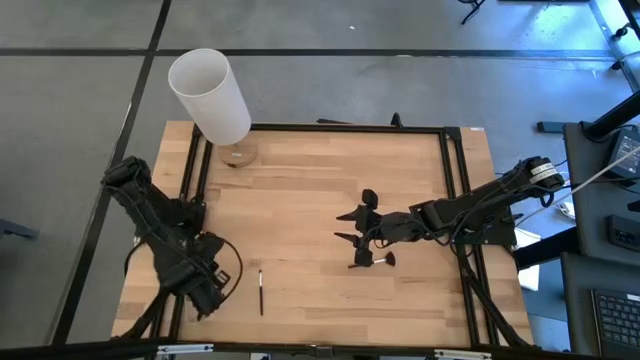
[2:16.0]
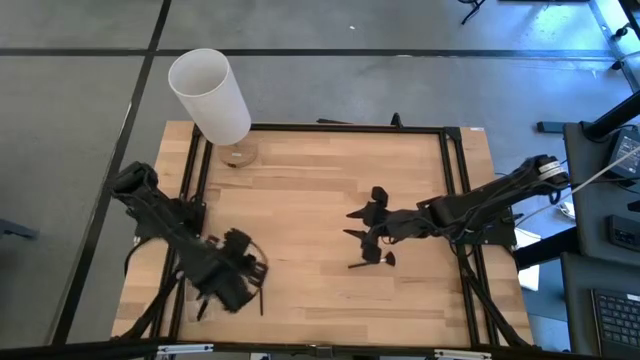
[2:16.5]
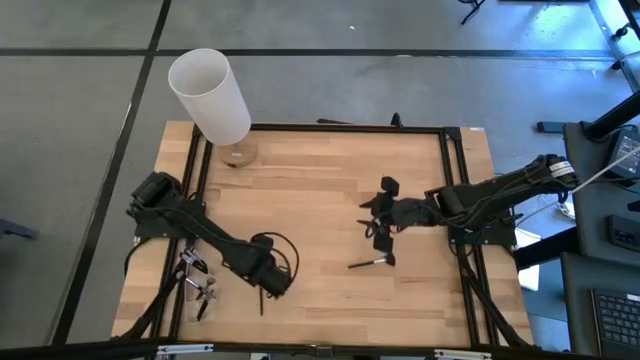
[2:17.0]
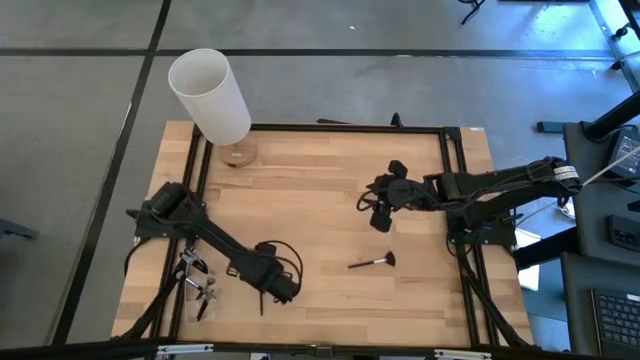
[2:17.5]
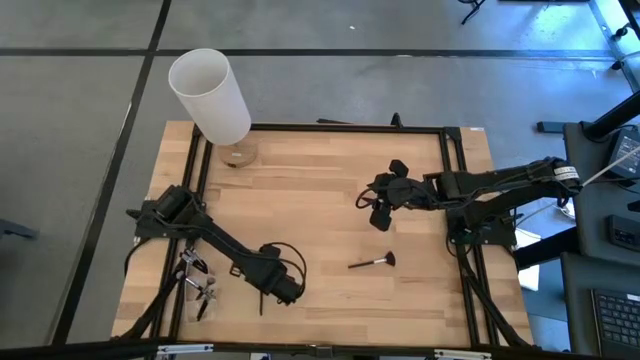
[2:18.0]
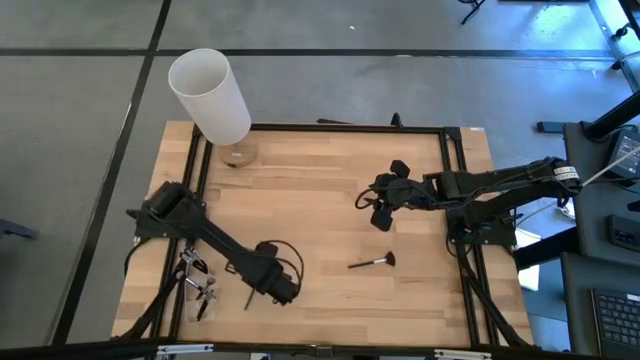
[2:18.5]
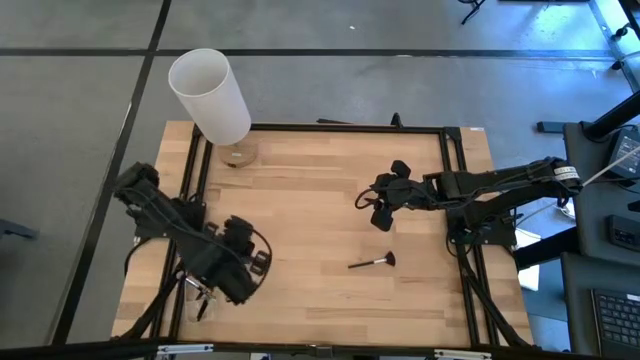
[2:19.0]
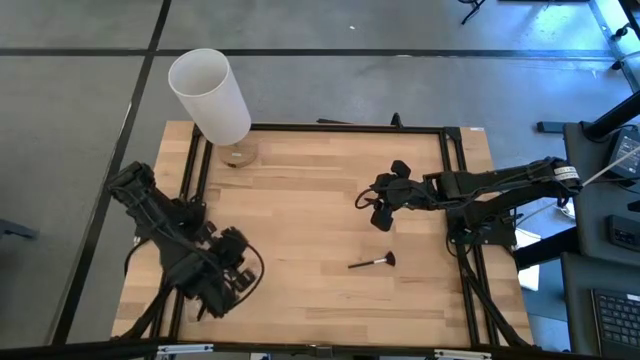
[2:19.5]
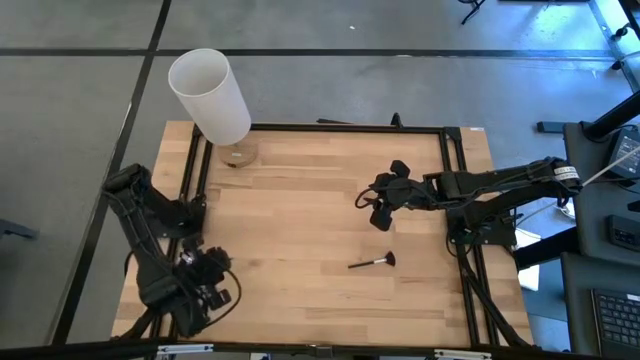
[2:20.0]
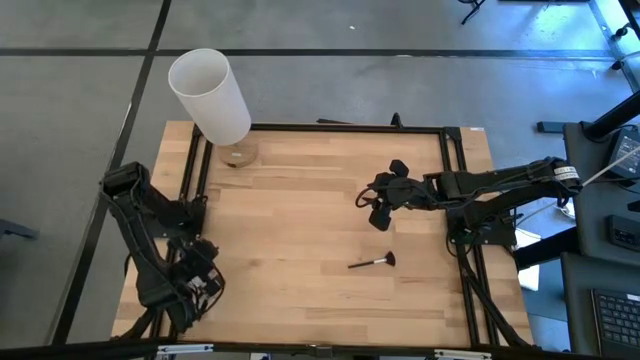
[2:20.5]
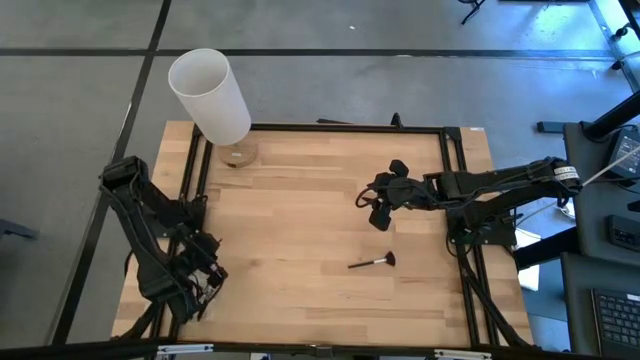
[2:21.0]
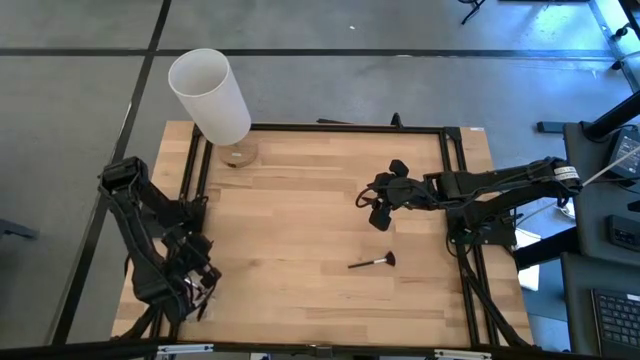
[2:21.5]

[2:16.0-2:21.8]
Task: Put items in baskets/containers
Put the eyeshadow brush into the transparent organizer

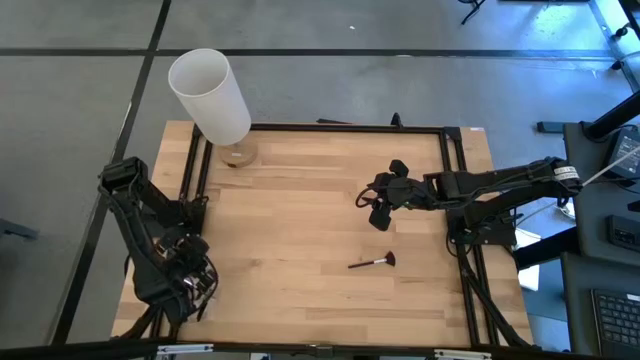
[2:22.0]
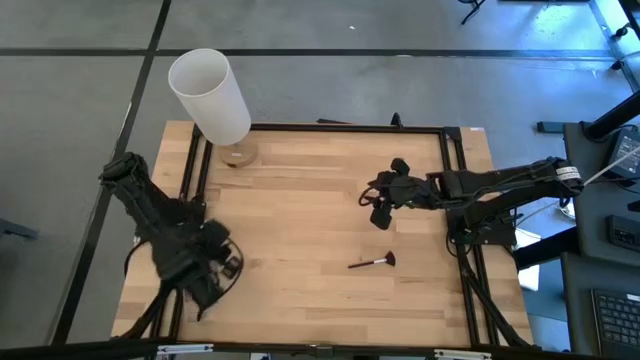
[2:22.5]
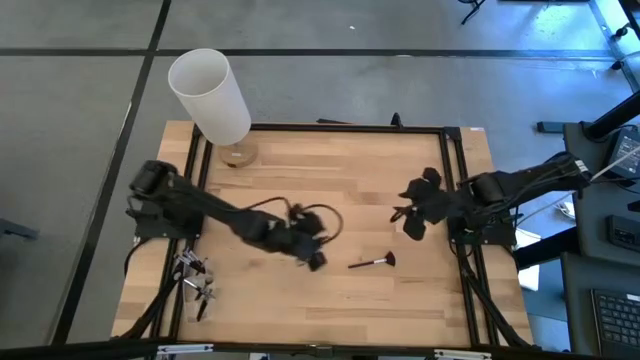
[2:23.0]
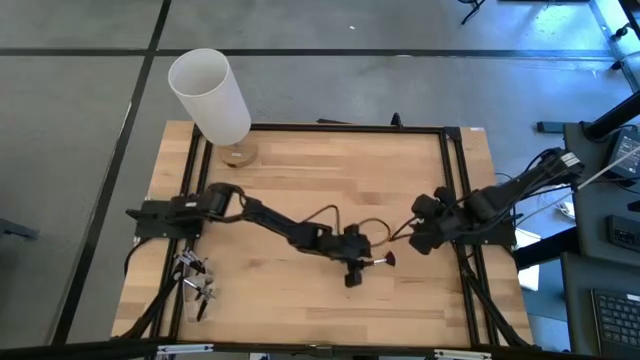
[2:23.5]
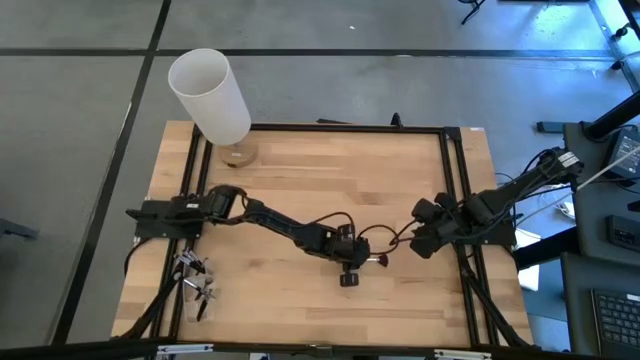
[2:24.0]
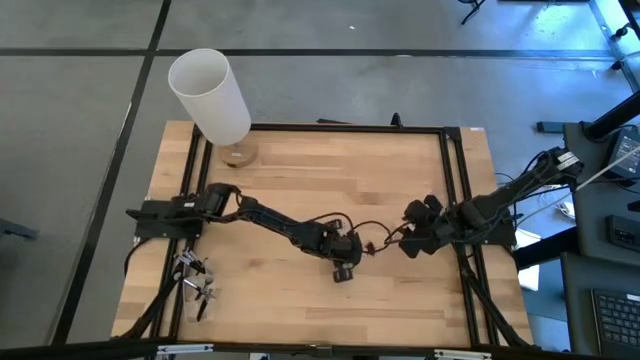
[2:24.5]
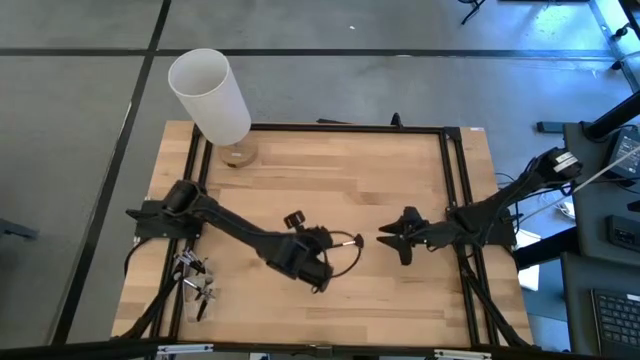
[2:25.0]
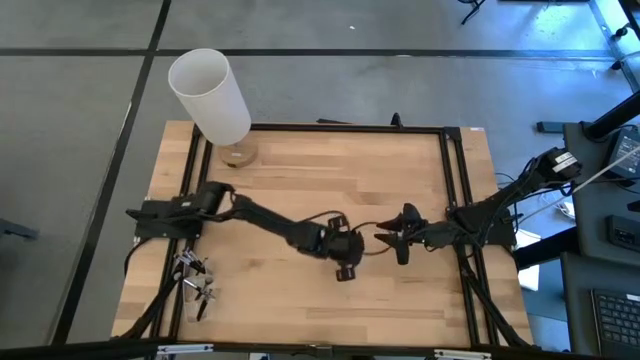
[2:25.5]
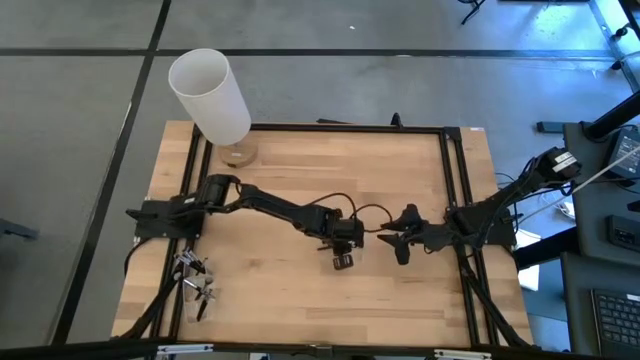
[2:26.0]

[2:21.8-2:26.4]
Put the highlighter brush into the transparent organizer

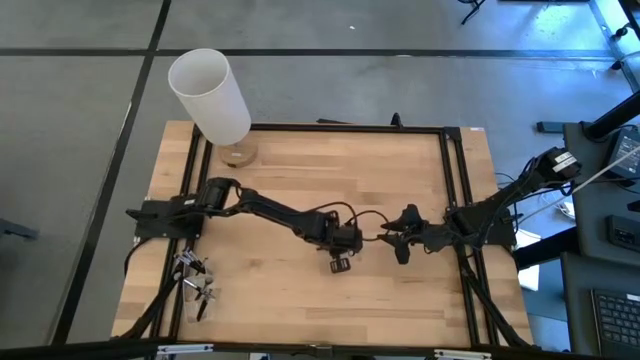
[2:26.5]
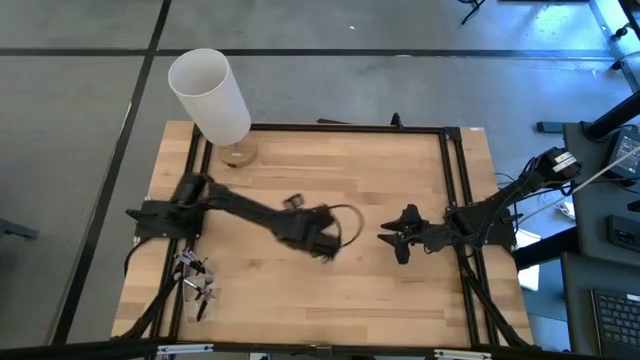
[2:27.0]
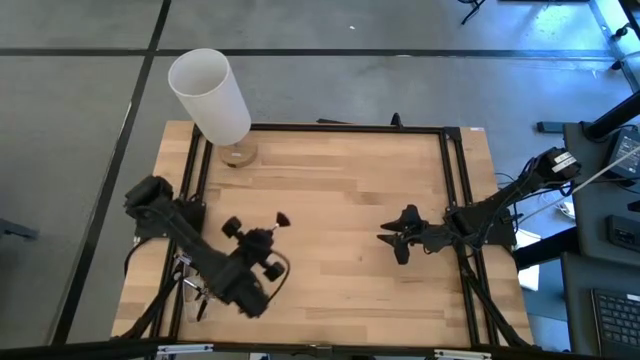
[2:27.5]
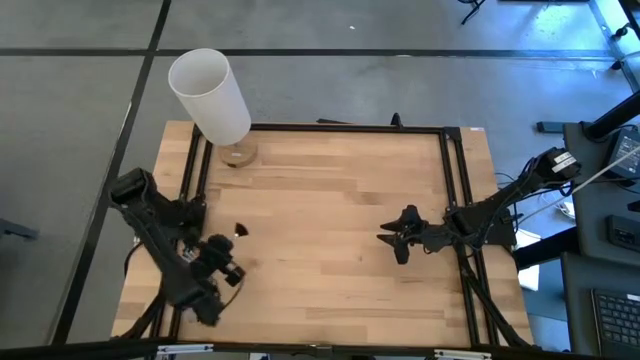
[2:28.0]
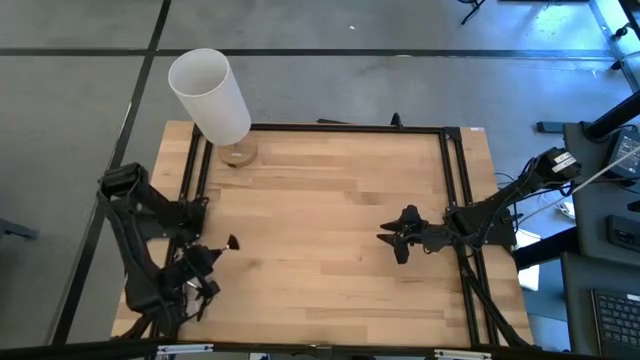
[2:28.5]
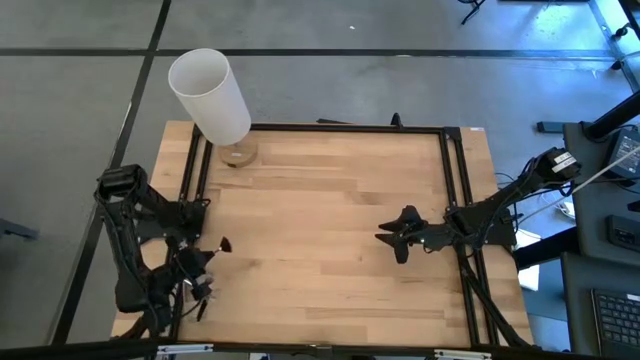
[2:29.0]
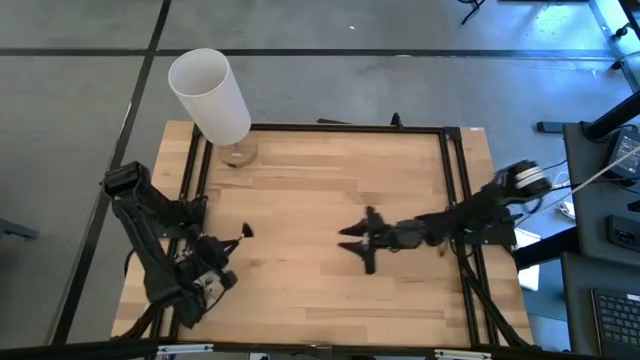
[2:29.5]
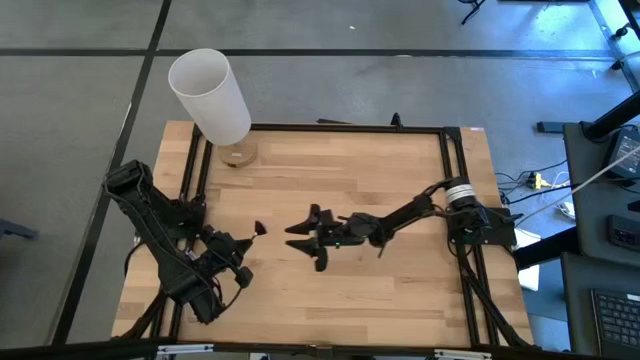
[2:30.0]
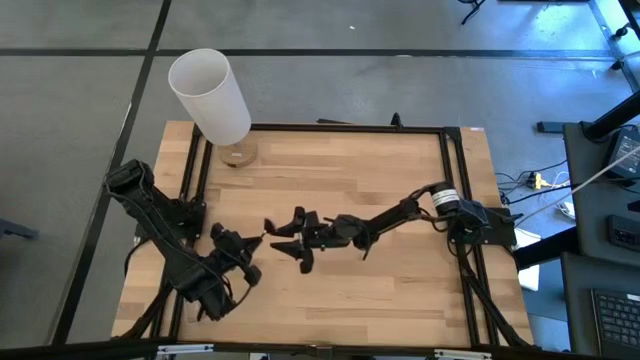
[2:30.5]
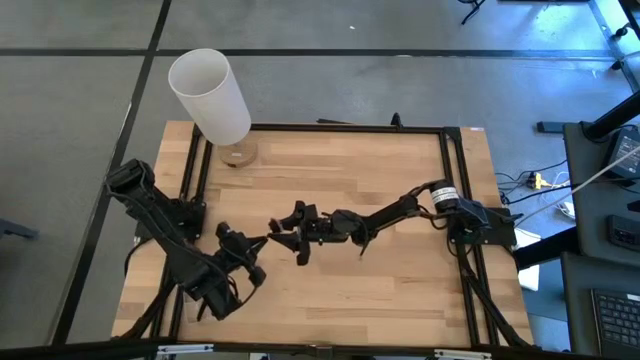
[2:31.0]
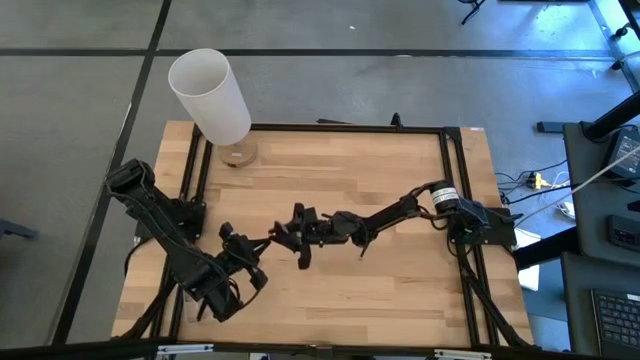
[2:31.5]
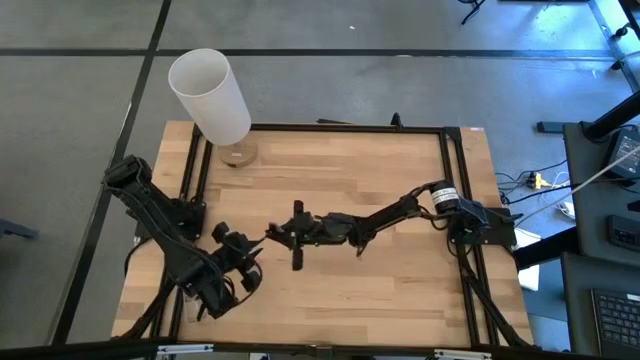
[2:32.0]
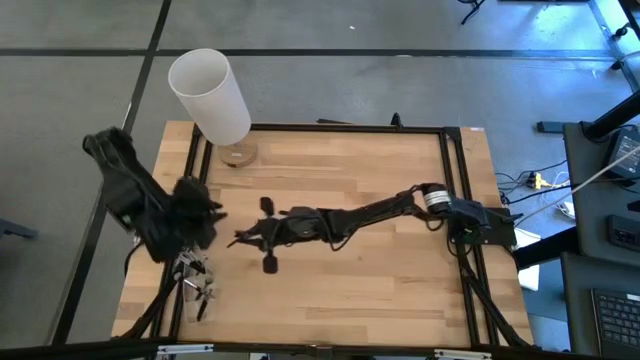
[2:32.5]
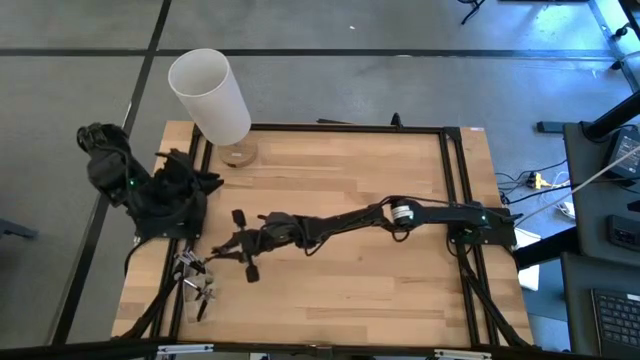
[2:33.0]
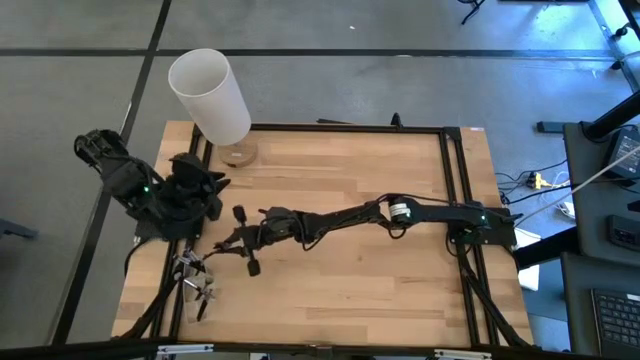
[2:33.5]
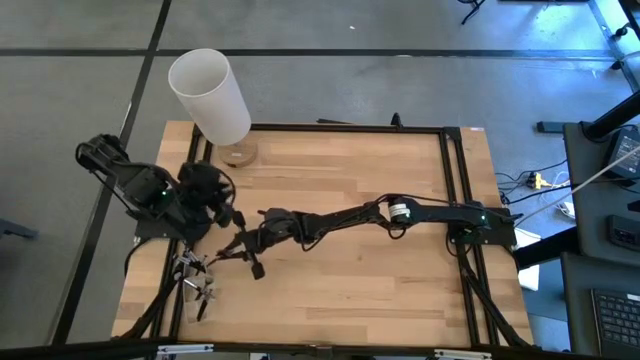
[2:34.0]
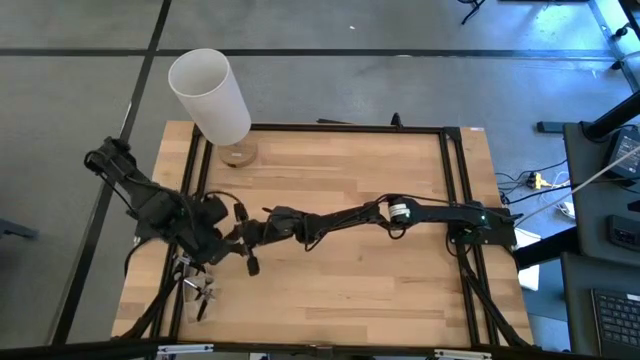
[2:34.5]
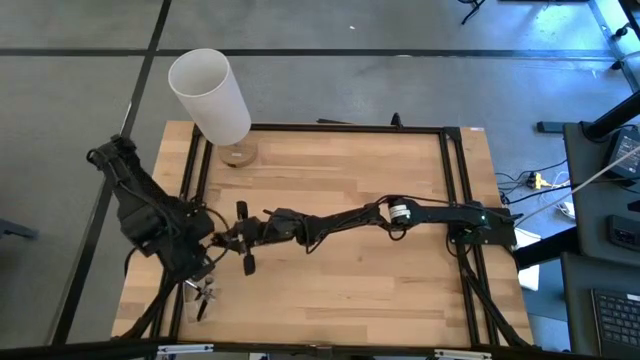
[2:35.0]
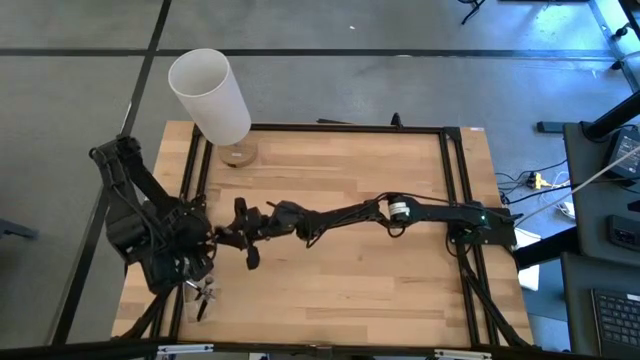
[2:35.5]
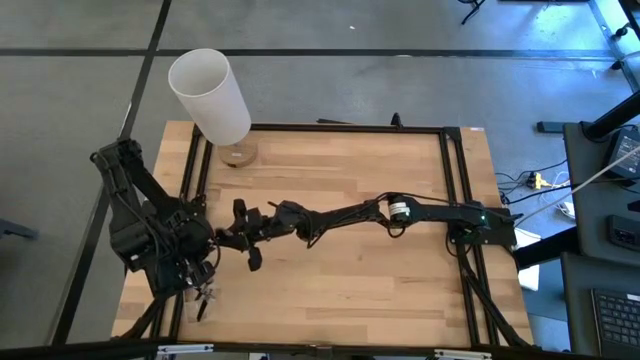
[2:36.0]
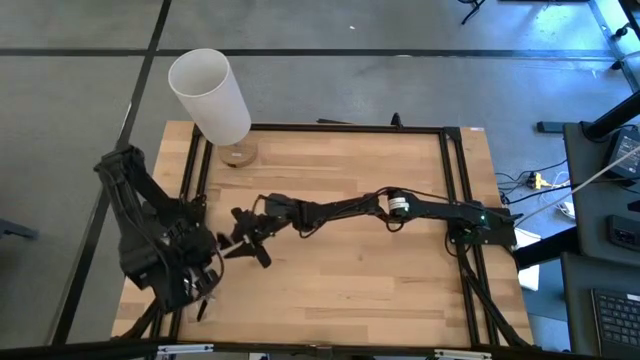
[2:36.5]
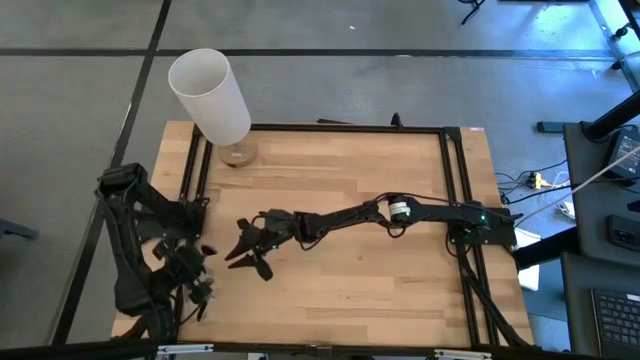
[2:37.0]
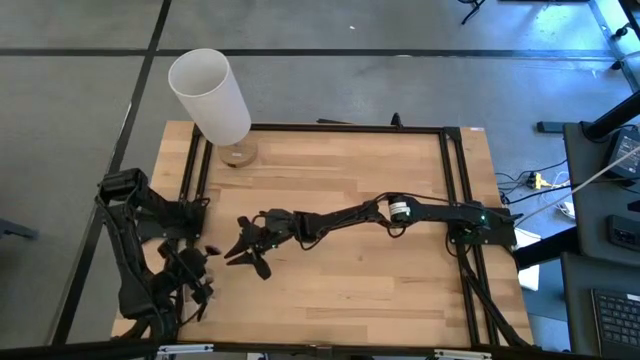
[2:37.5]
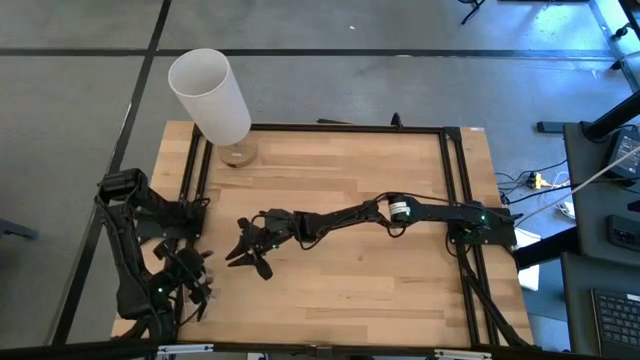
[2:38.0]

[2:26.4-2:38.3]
Put the highlighter brush into the transparent organizer
